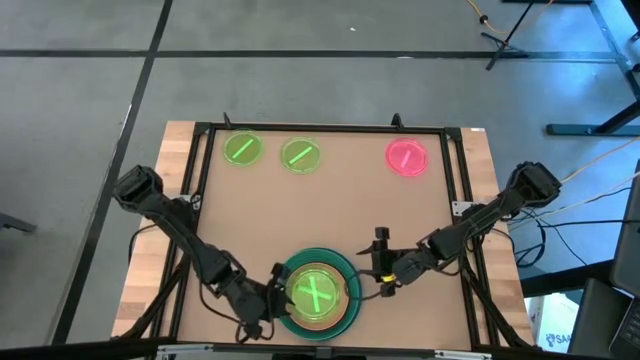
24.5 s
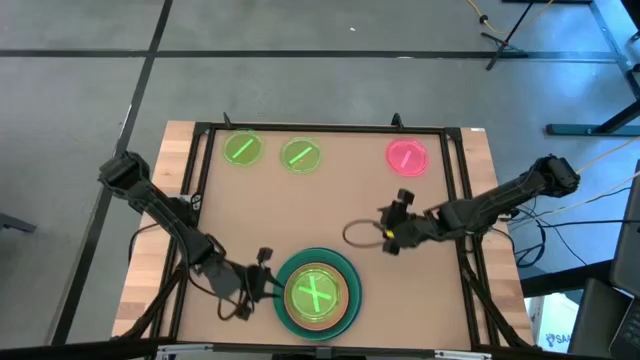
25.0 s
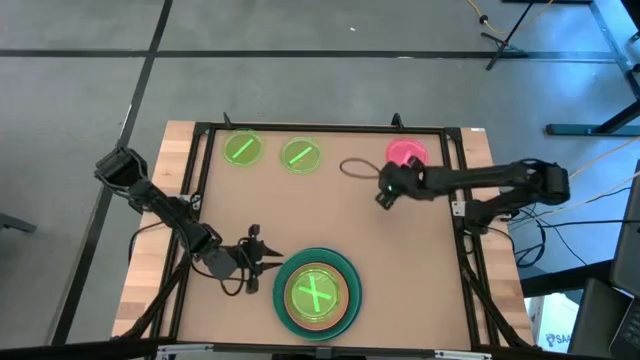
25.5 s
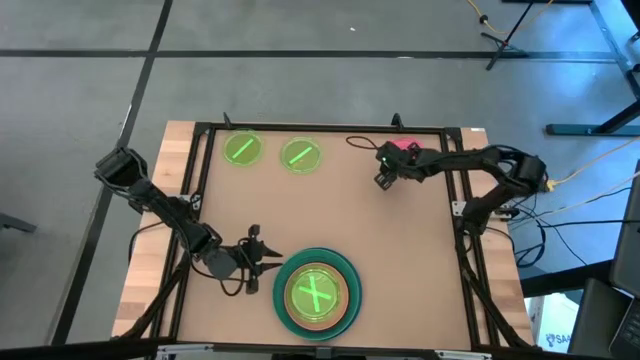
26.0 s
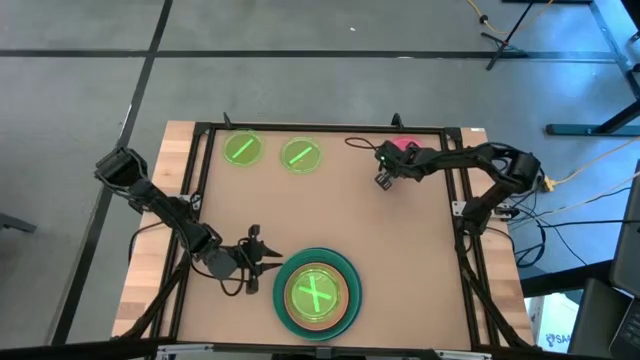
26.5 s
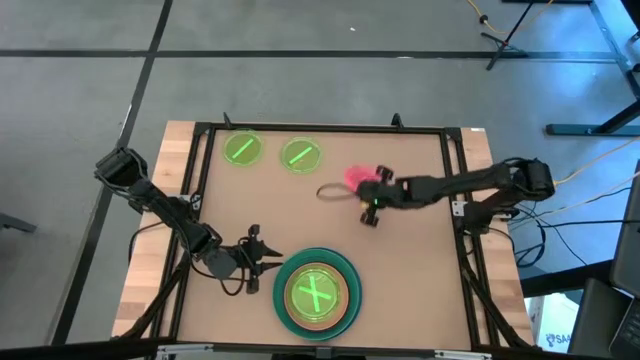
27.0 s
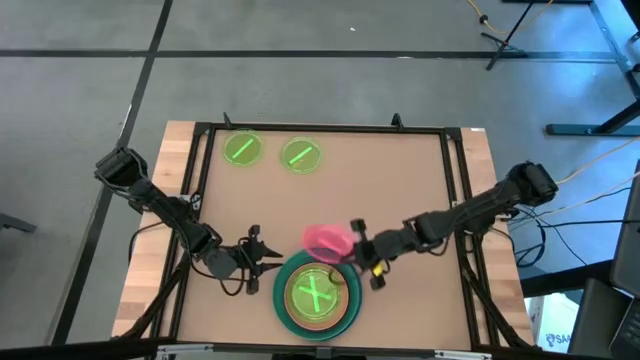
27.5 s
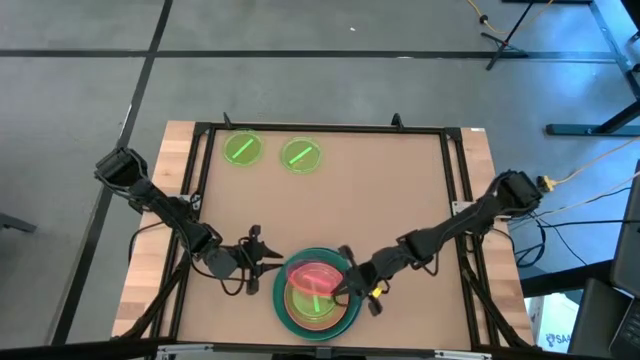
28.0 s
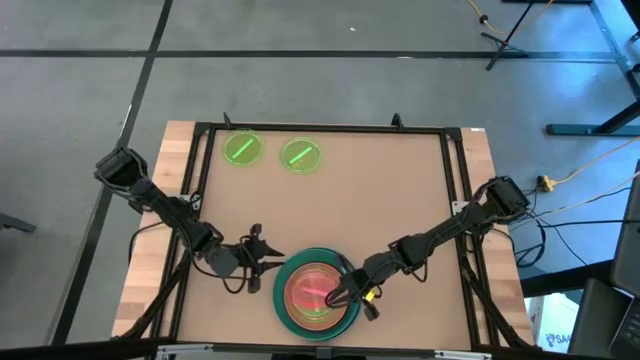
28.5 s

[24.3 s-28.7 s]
Task: Stack plastic plates
Stack the light pink plate on top of the light green plate

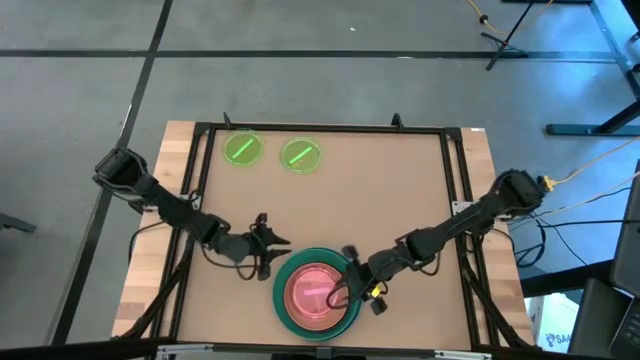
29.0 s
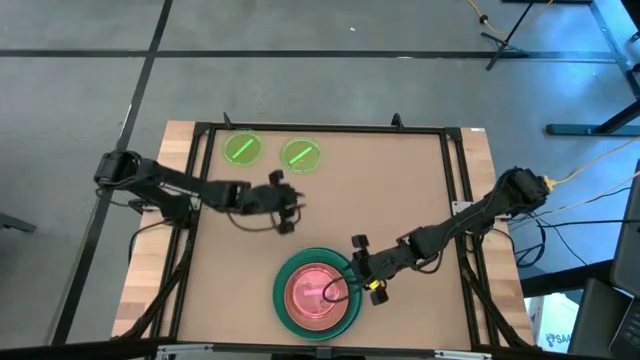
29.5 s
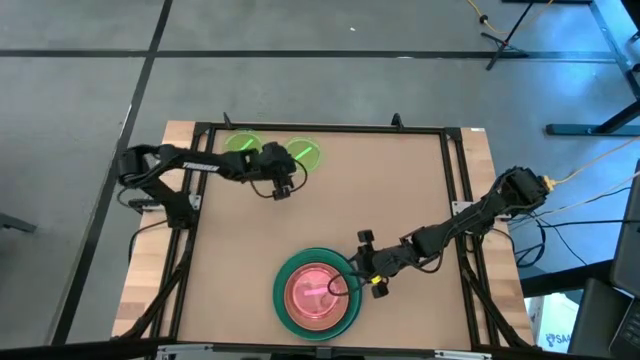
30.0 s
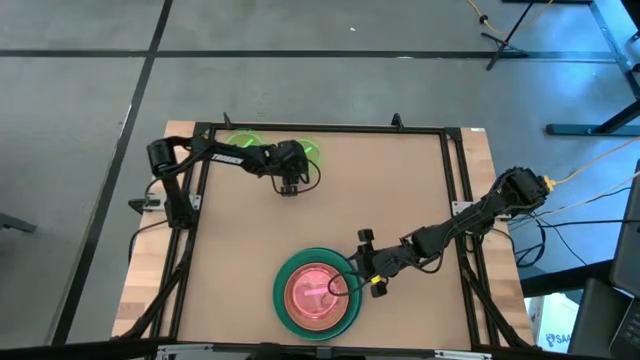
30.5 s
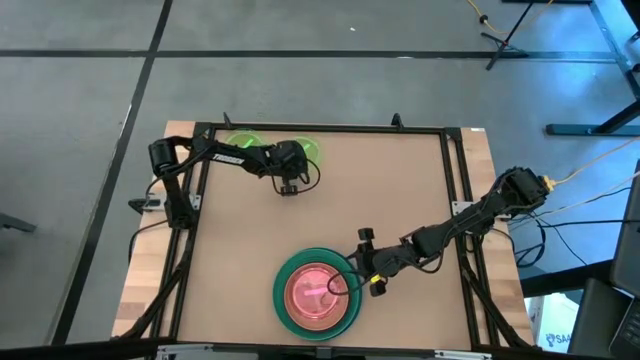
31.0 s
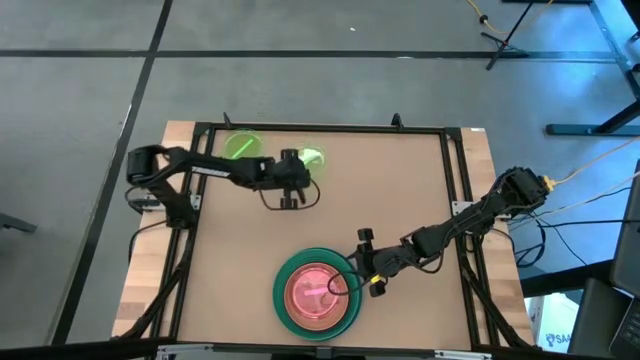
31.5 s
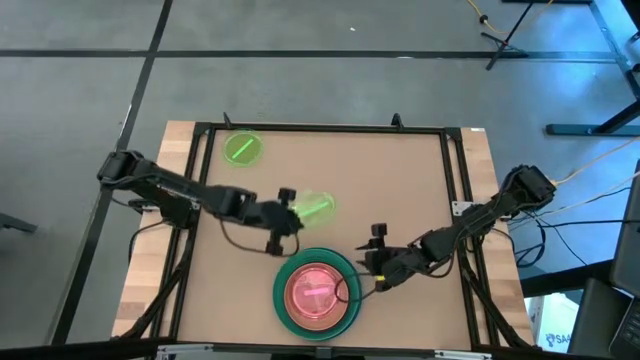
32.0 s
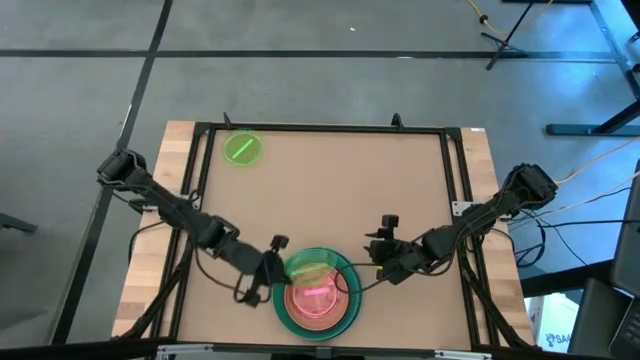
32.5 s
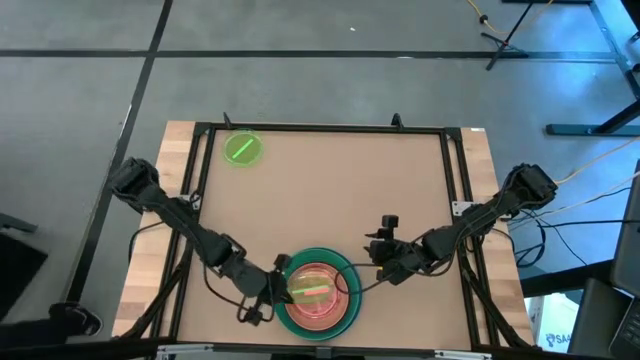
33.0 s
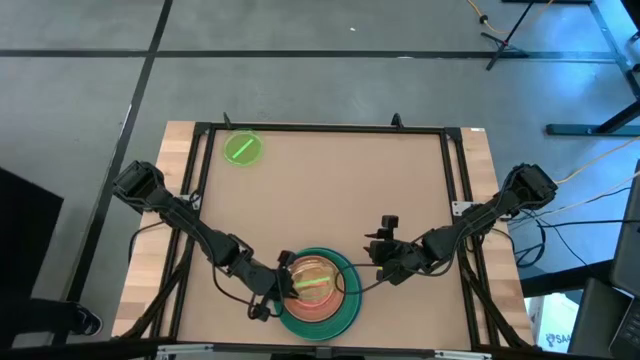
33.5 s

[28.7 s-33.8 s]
Stack the right light green plate on top of the light pink plate

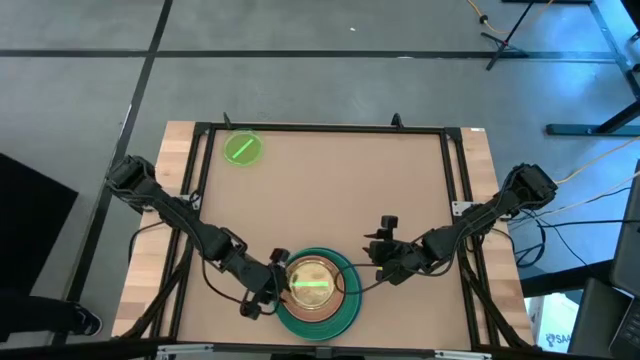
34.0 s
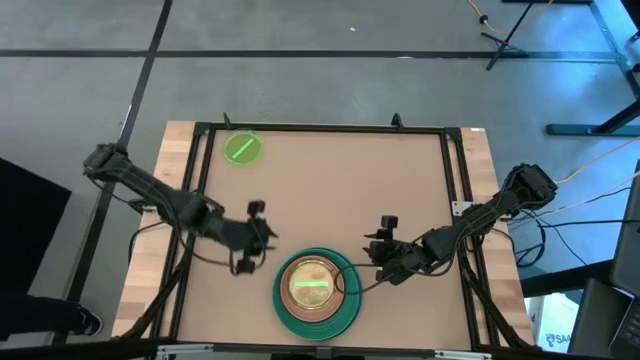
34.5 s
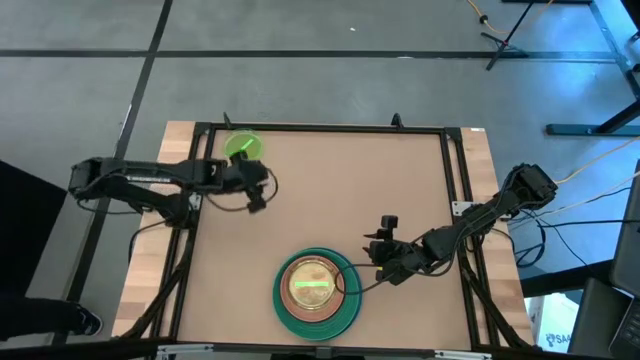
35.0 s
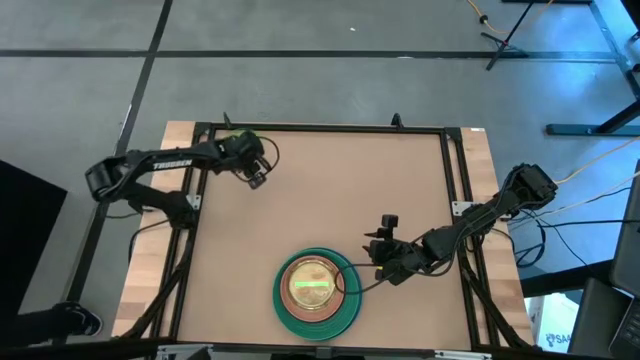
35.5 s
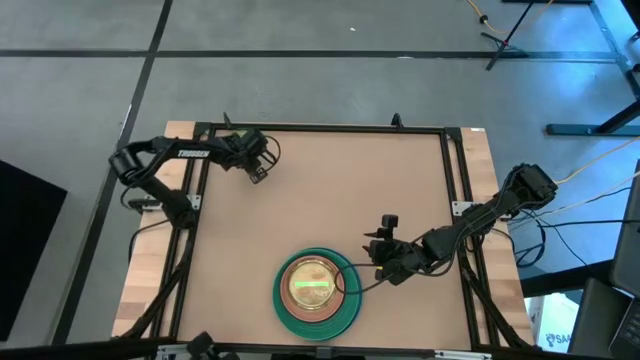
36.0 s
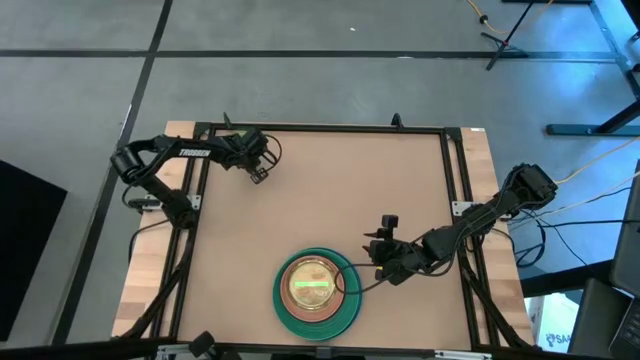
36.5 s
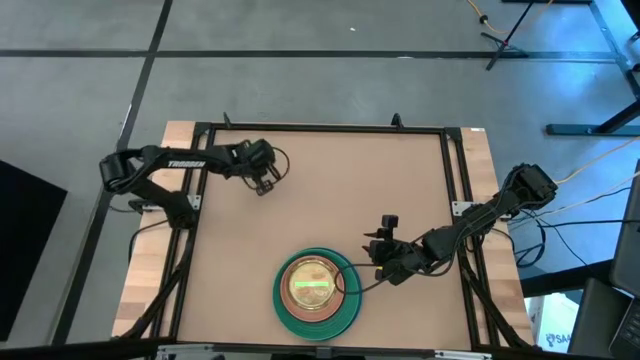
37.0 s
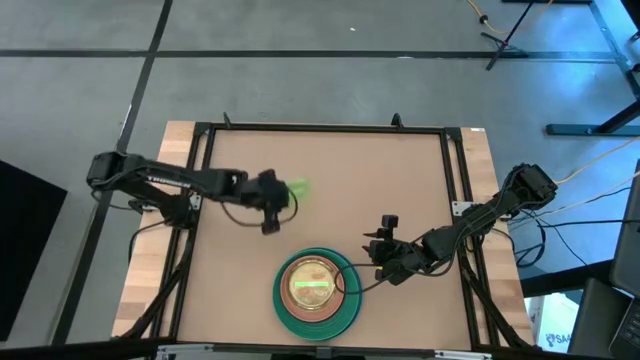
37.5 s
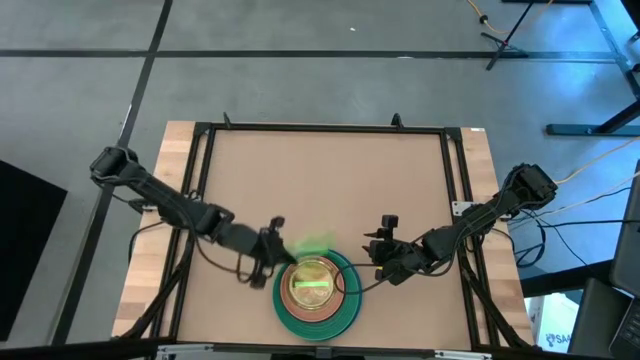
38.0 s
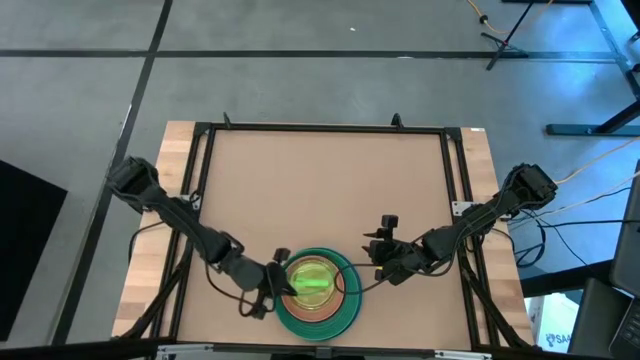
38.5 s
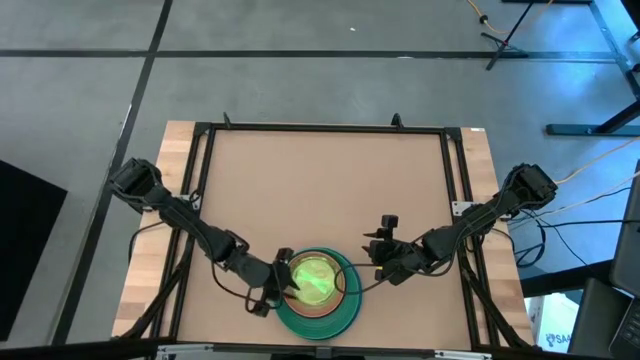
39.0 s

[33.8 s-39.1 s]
Stack the light green plate on top of the light green plate

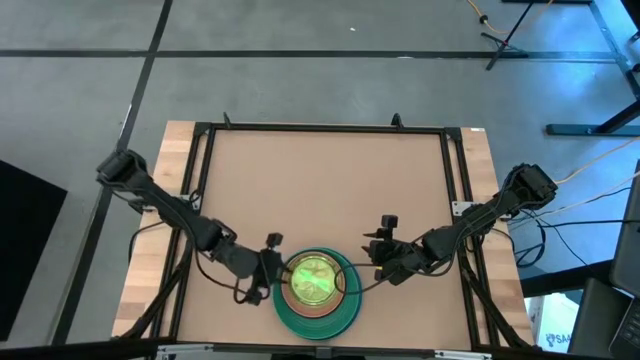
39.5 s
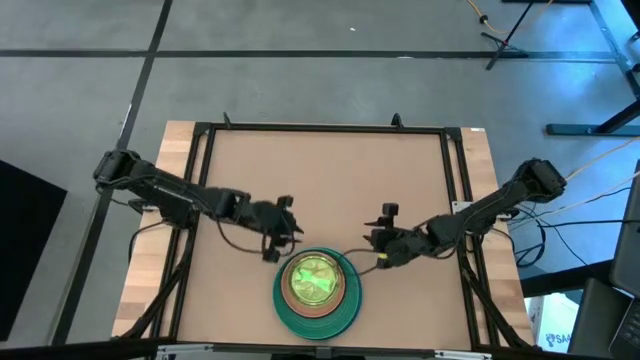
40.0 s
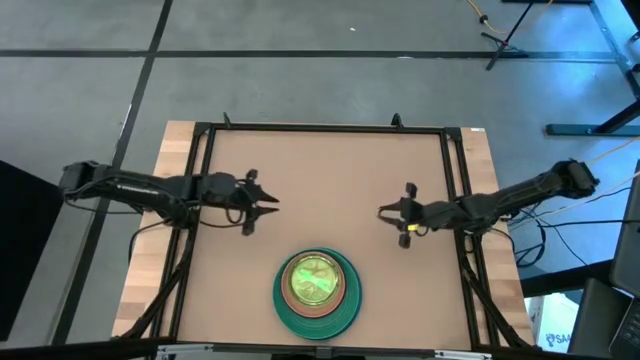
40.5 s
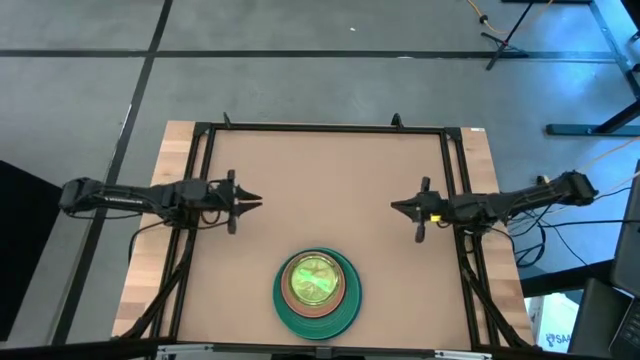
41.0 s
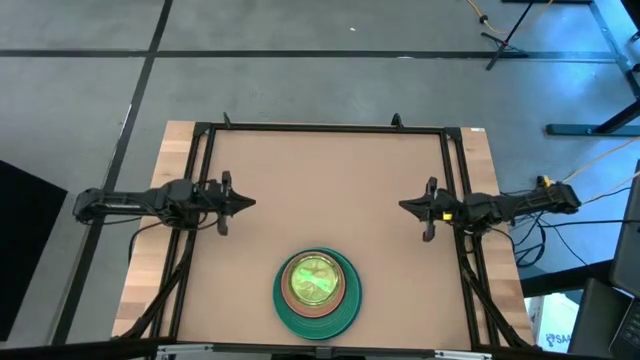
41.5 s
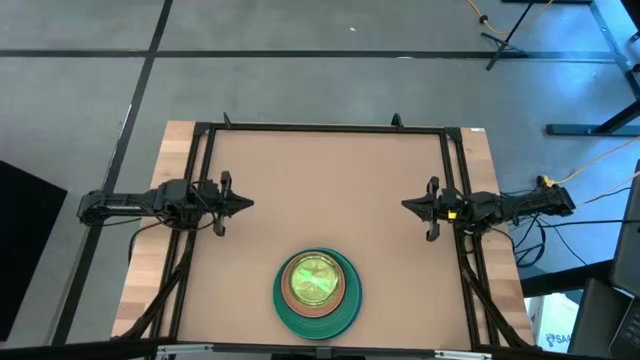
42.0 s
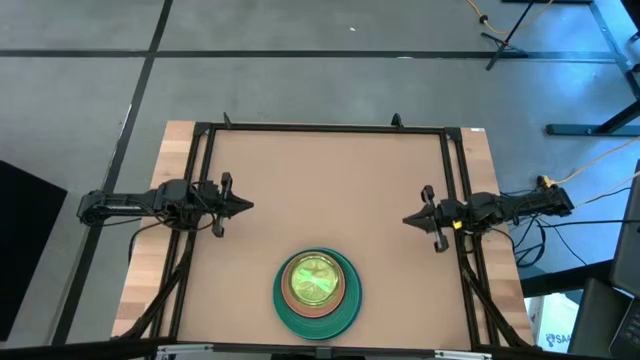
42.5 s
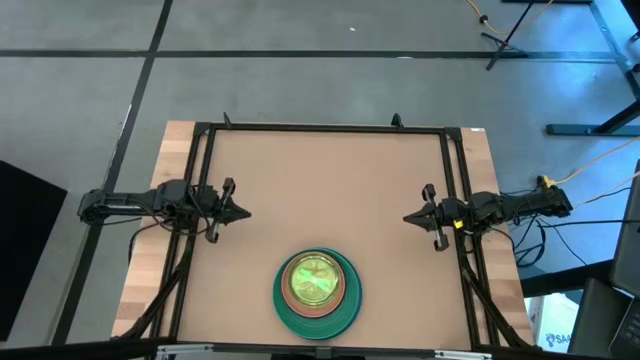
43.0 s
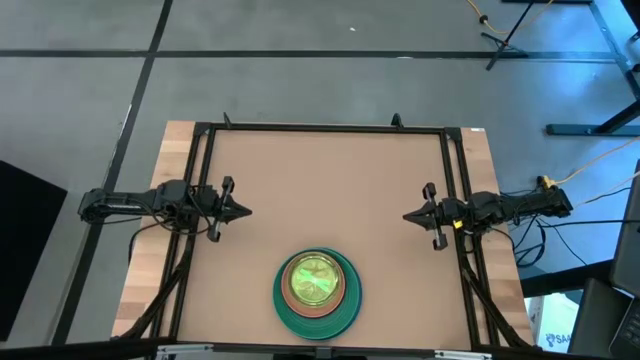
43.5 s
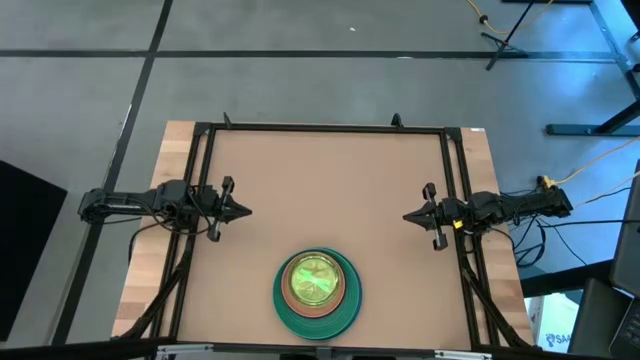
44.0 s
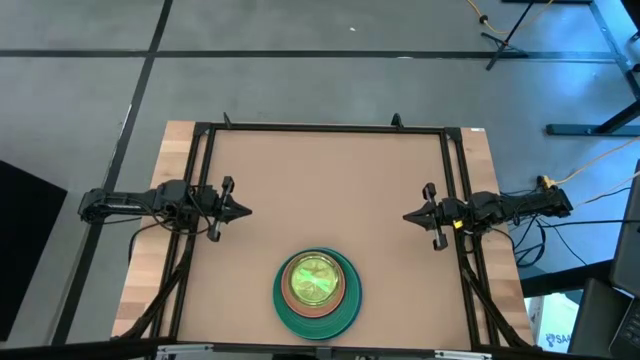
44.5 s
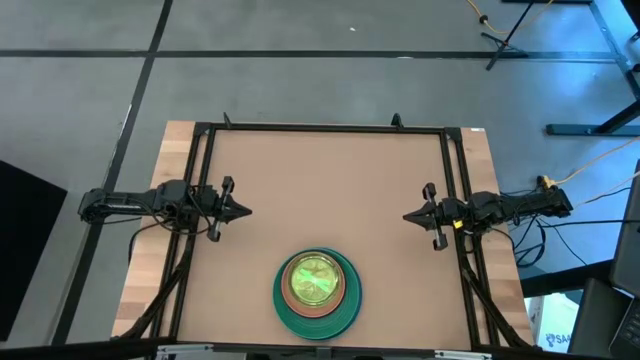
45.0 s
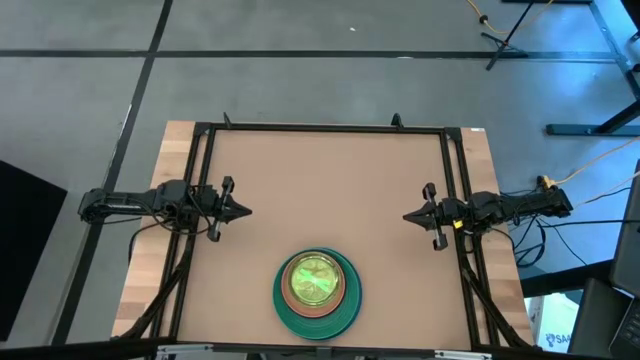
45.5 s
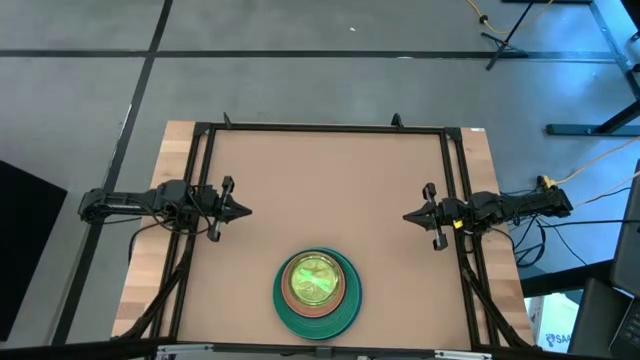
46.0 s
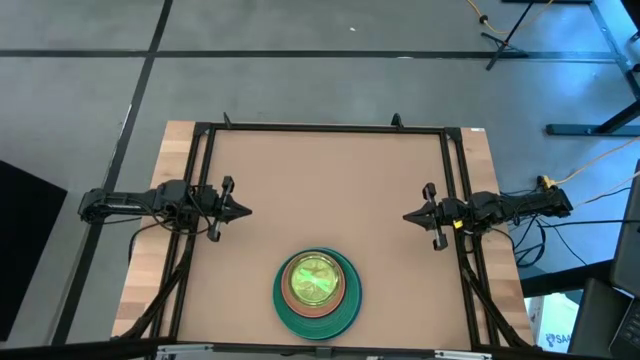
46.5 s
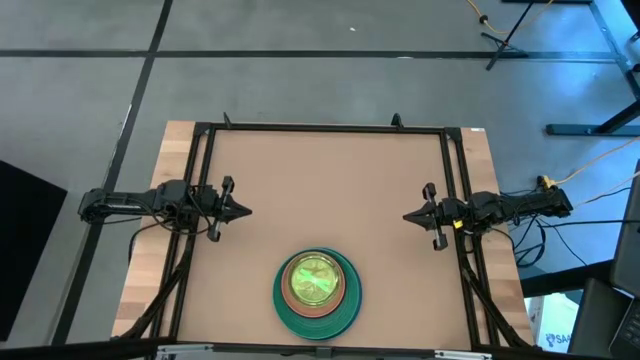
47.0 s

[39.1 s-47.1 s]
Return to Home Position
